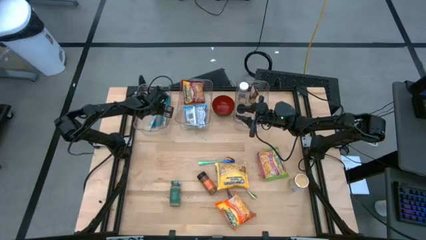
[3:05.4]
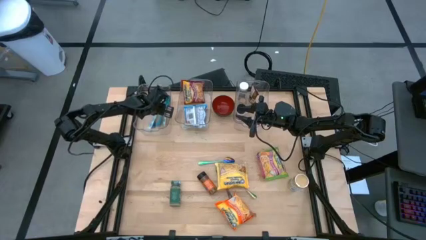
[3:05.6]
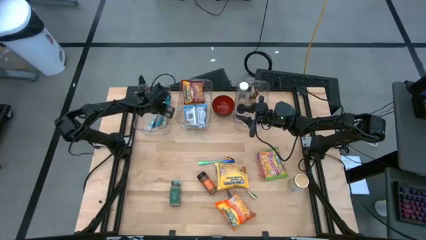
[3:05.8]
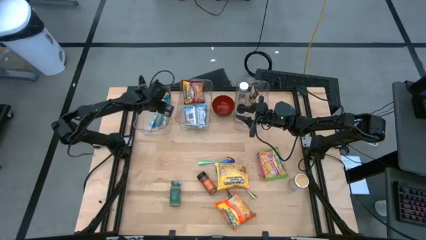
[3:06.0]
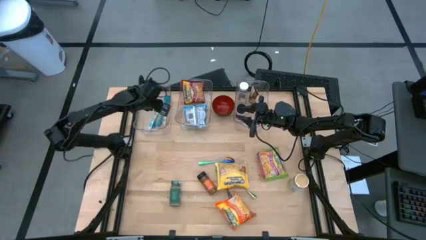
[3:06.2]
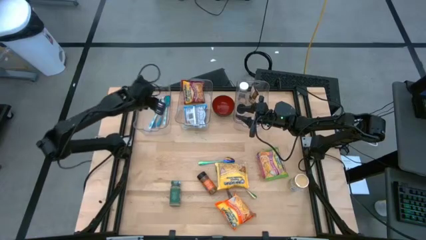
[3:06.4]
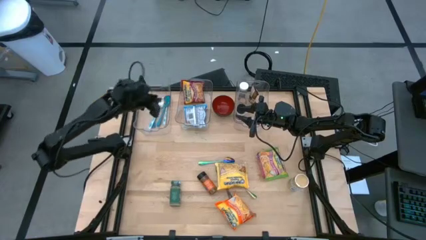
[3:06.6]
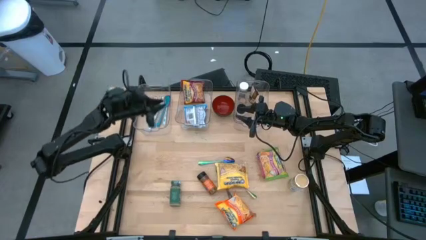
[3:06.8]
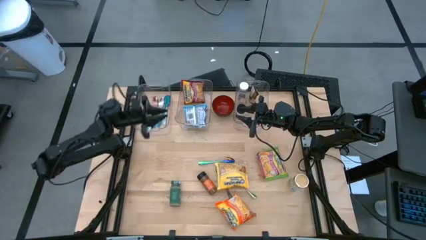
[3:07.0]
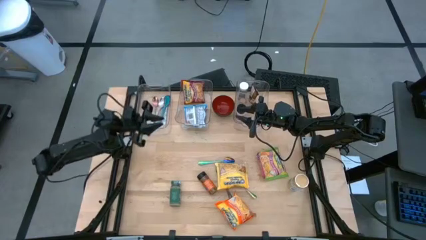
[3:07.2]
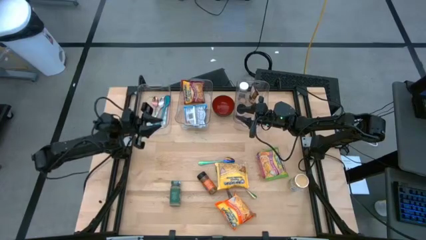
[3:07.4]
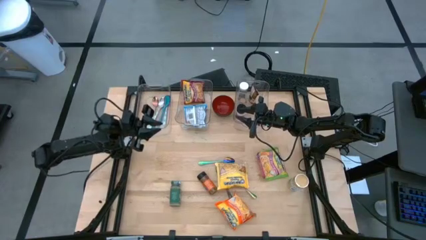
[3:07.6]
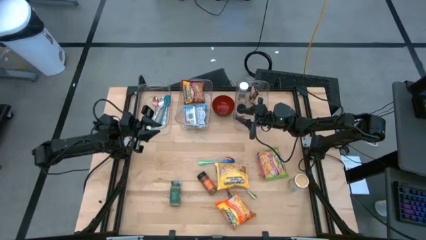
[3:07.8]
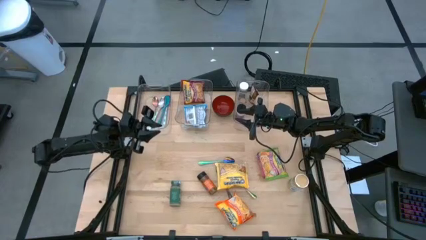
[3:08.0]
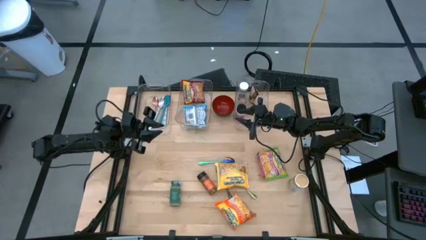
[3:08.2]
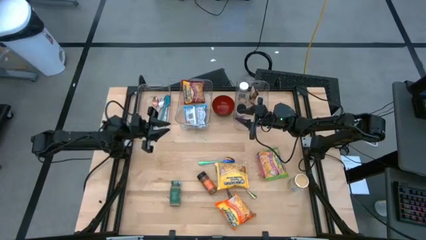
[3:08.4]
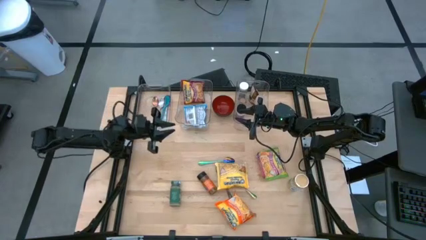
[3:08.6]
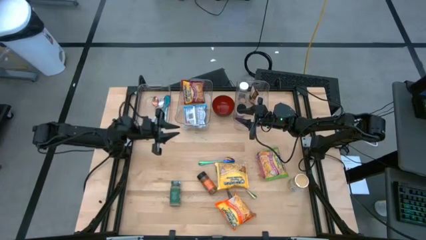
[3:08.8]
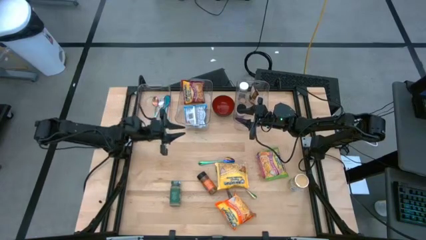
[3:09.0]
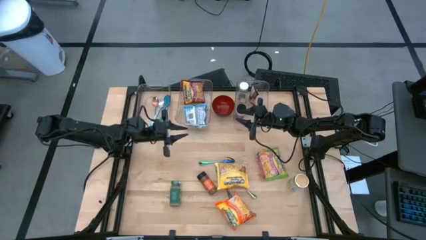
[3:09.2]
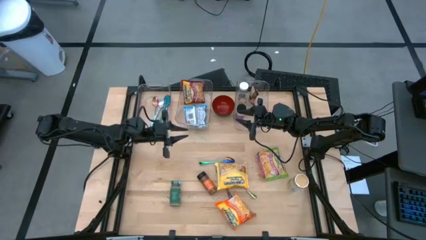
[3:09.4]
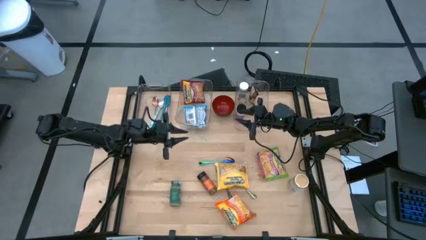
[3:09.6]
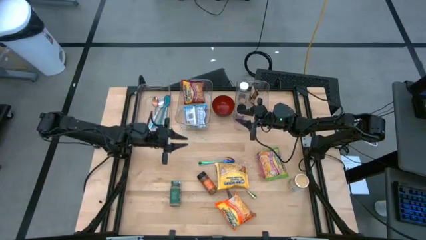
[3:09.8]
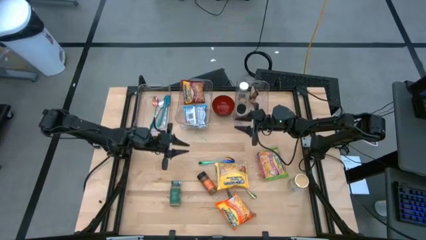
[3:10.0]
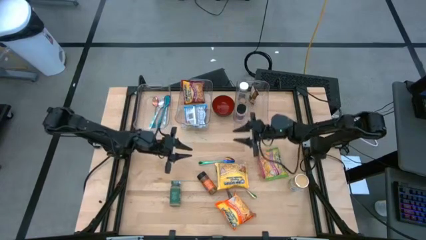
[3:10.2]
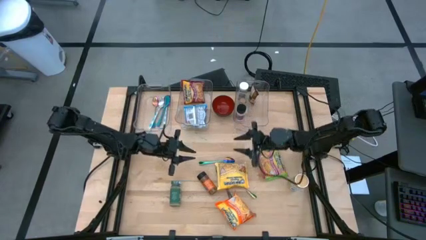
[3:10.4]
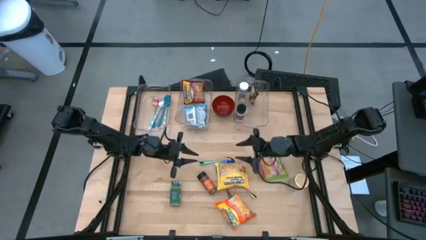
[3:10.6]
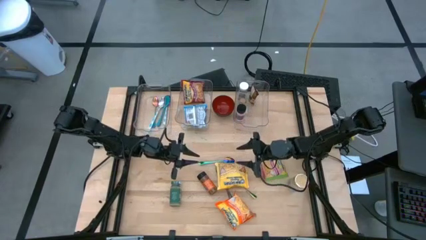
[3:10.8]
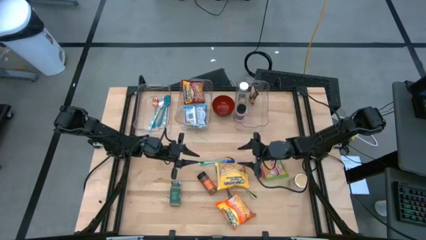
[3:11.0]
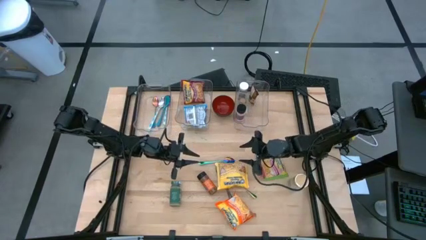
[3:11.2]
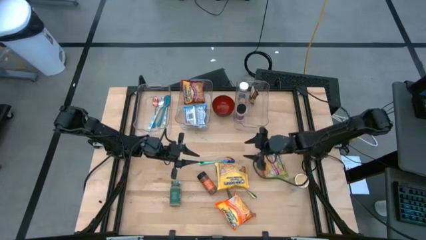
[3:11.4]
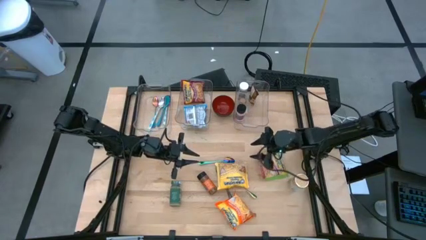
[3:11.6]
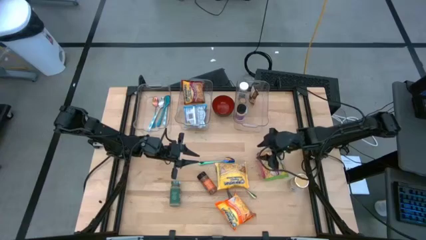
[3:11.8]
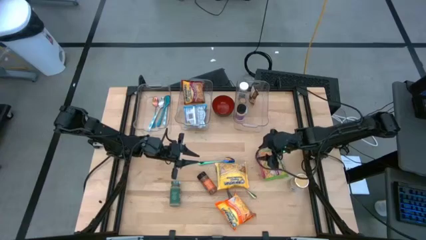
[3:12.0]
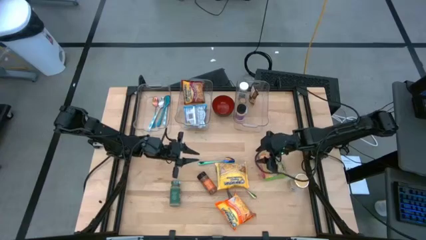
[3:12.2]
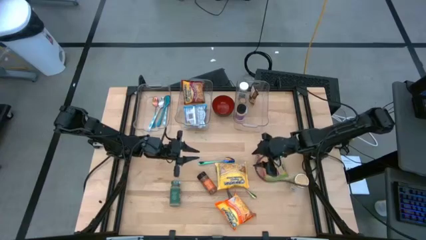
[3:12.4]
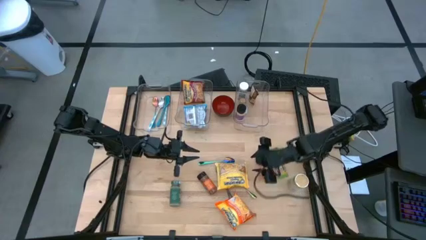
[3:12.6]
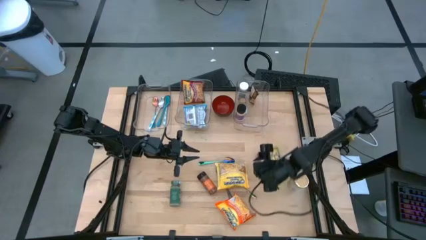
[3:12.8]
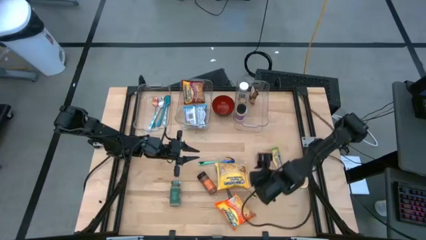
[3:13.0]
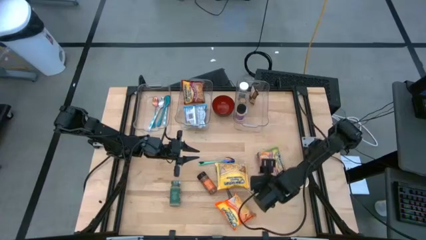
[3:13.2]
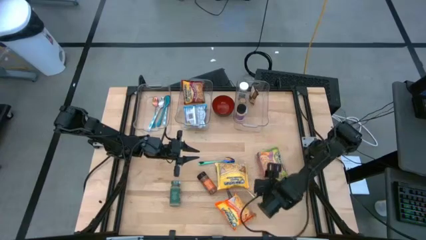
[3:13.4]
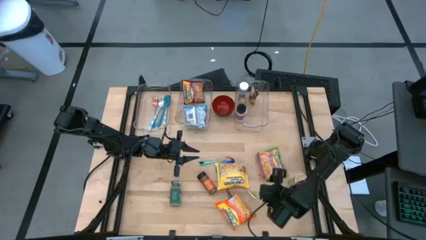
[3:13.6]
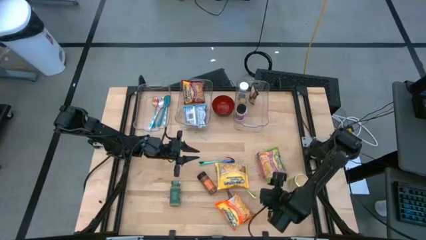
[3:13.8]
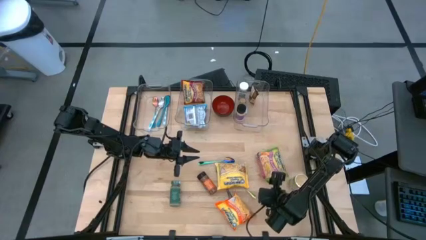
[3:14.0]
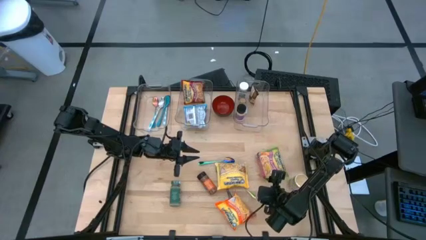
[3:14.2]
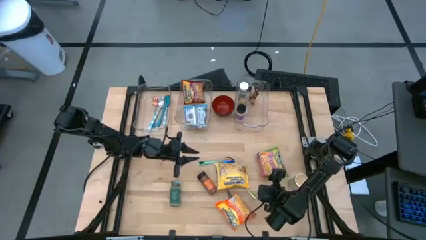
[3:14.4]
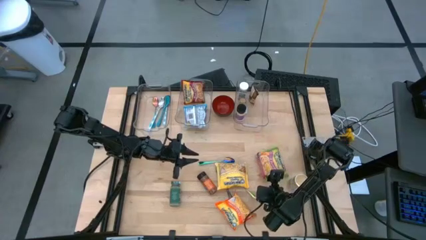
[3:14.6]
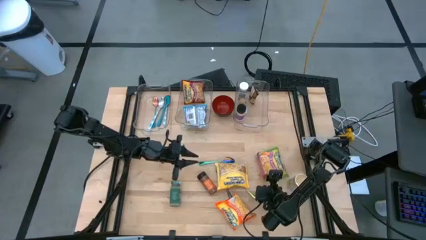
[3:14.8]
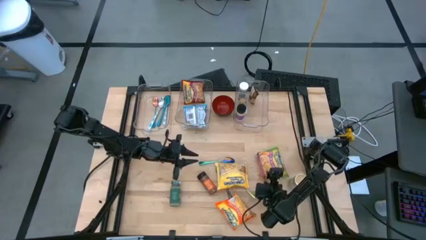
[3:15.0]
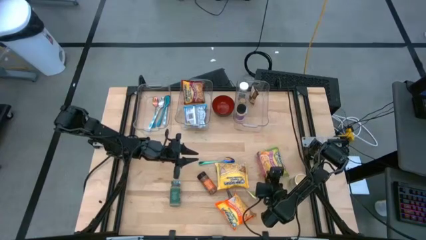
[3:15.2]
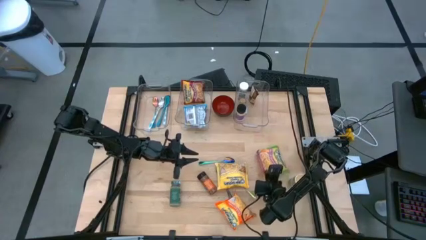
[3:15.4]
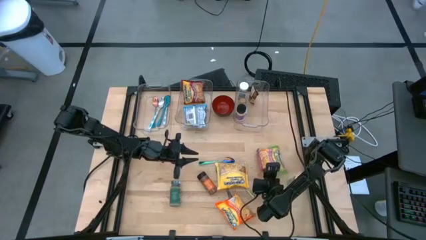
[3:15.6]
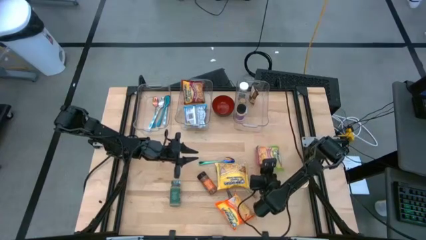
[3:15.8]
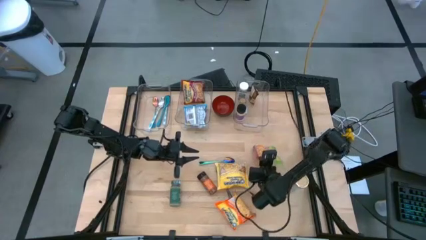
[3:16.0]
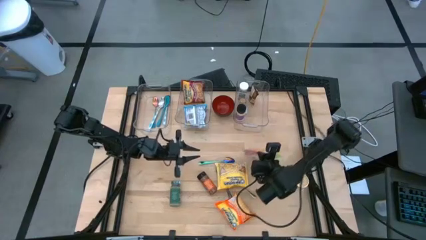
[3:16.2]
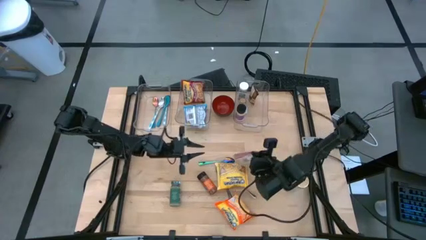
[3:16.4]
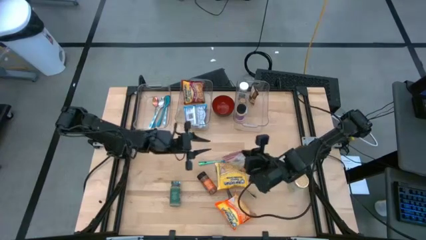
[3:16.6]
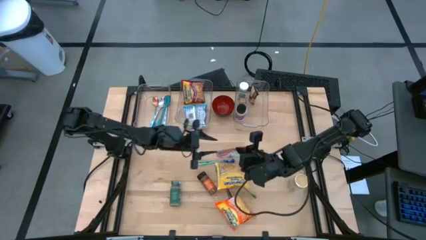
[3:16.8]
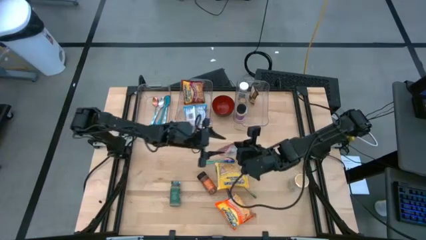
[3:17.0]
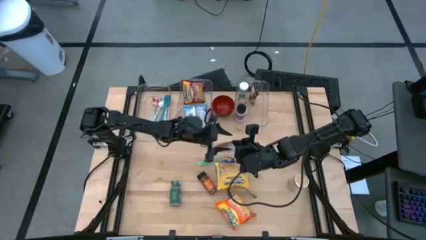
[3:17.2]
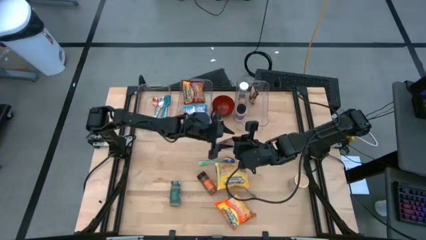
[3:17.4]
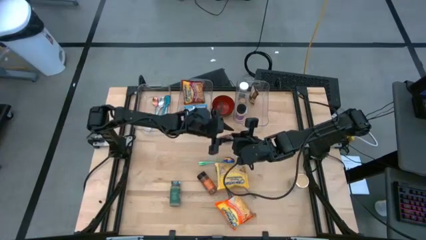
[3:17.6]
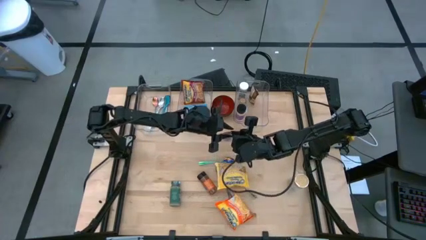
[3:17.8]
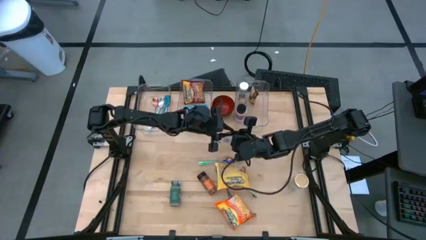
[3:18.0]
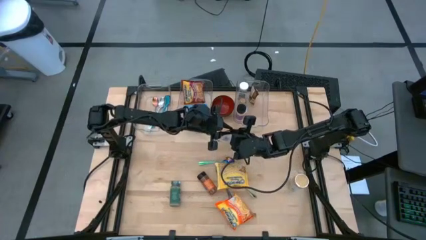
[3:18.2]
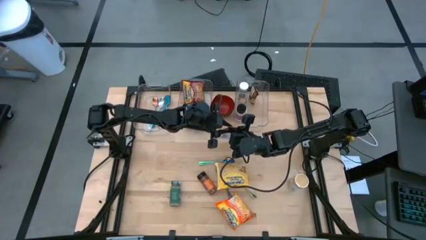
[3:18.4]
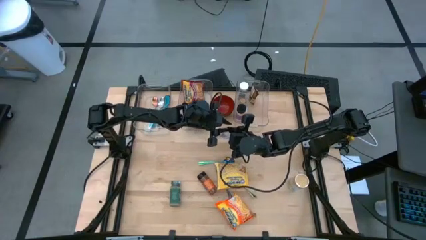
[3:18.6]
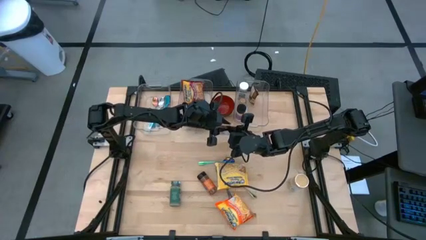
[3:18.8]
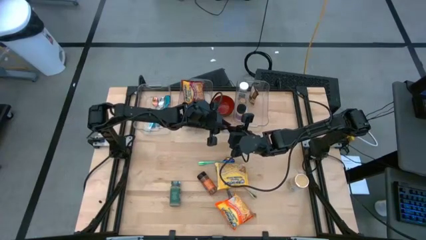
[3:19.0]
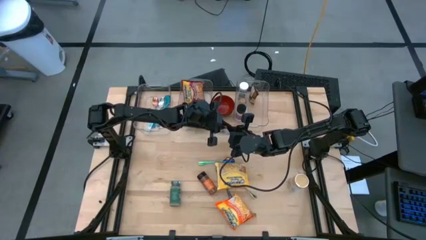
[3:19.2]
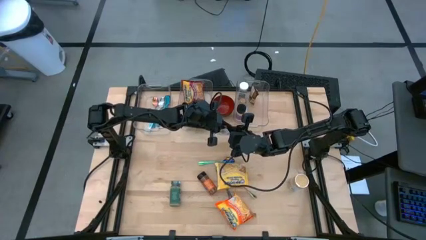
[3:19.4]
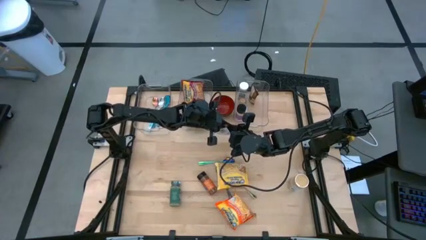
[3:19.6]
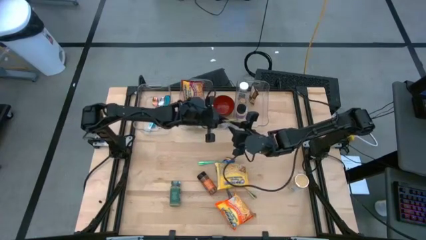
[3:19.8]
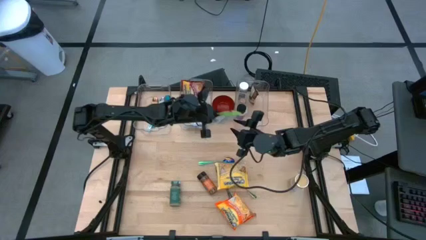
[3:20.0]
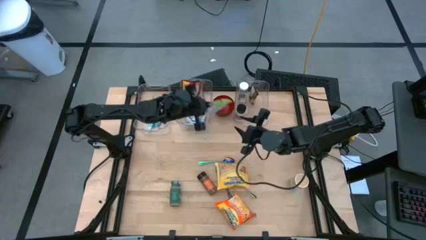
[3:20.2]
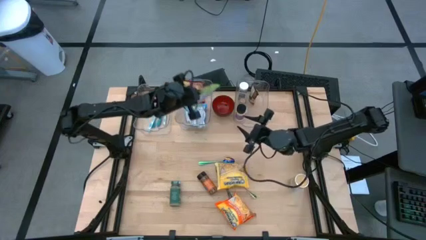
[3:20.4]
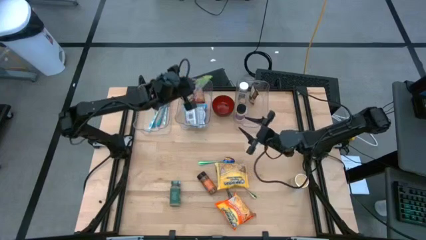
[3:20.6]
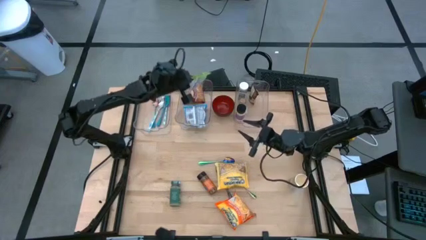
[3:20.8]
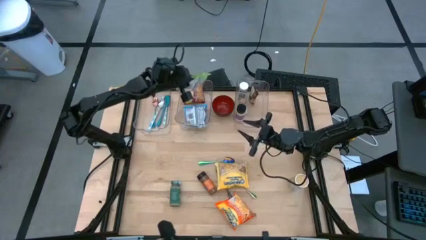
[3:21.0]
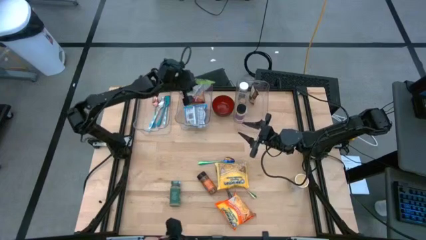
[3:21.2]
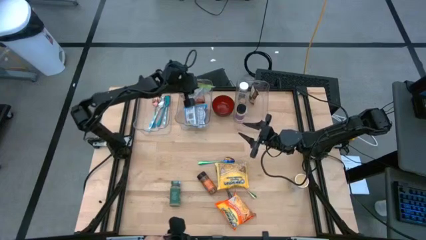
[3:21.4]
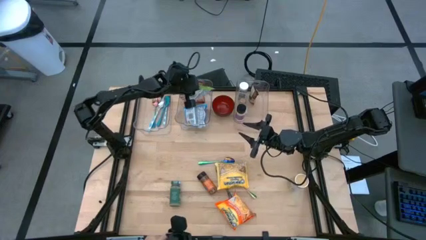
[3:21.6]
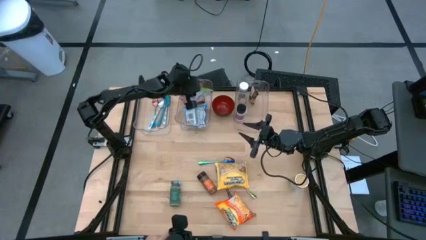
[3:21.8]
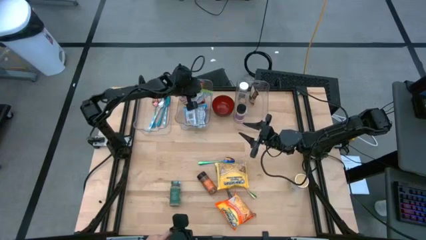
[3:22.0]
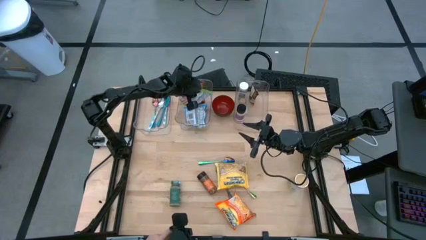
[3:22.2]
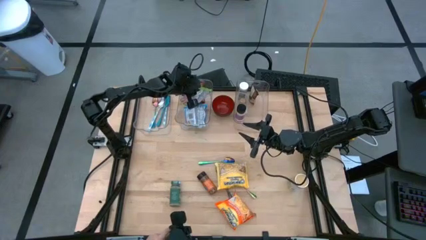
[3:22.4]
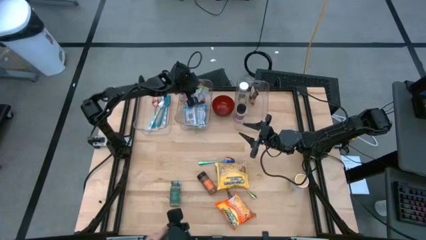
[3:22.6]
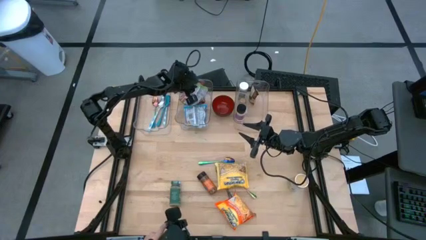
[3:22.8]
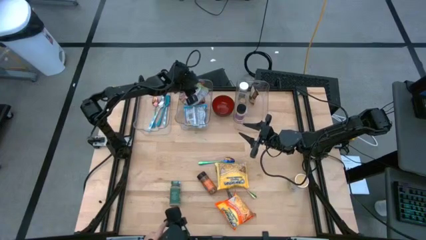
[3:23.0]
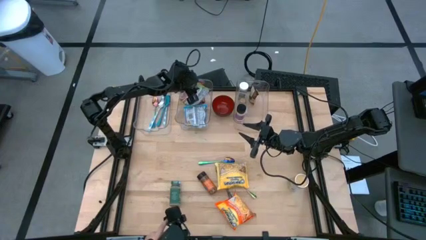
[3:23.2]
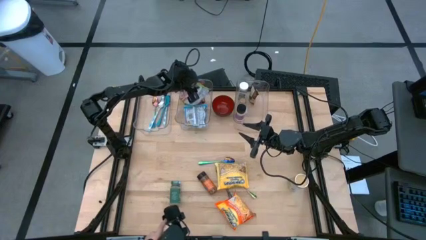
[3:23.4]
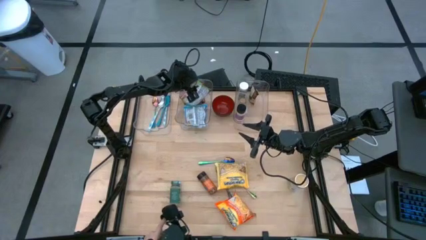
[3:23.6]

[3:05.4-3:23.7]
Task: Pick & Place Food Item
Put the green noodle pack into the middle transparent bin
